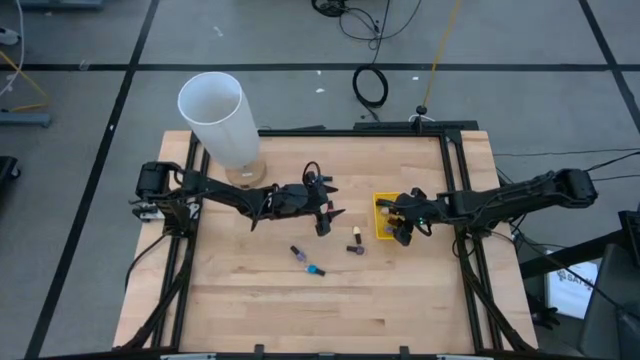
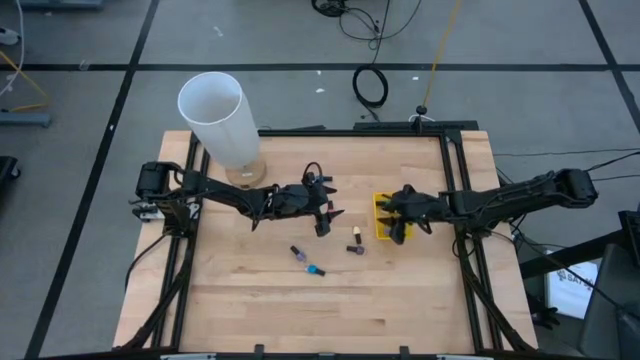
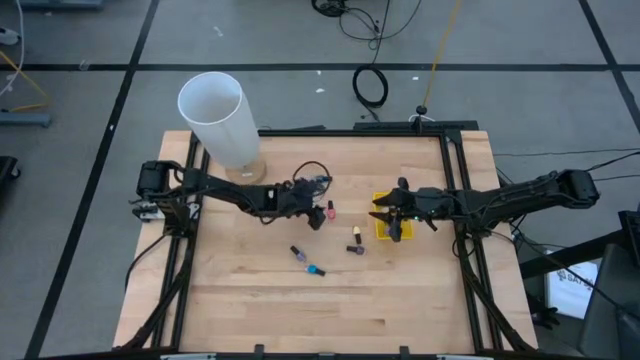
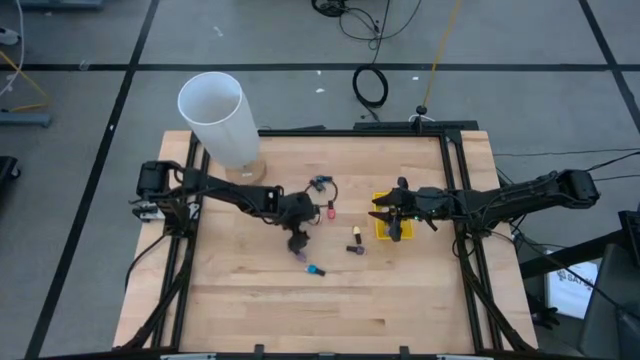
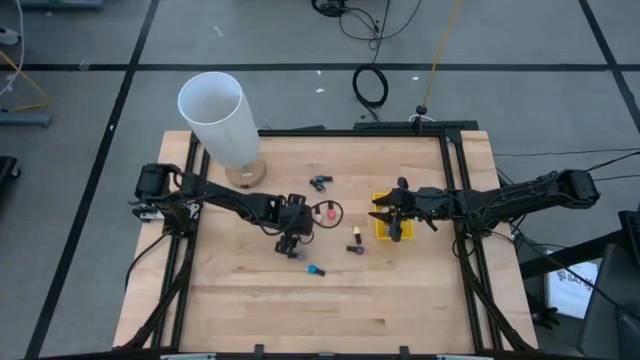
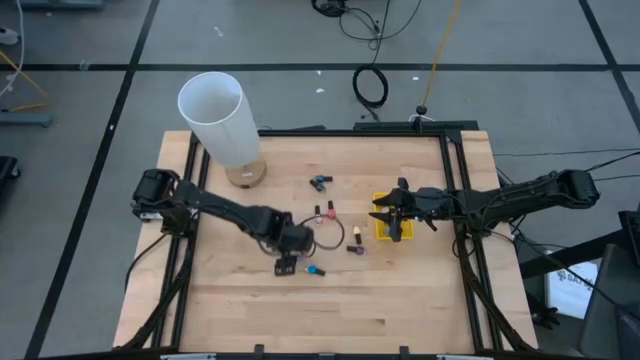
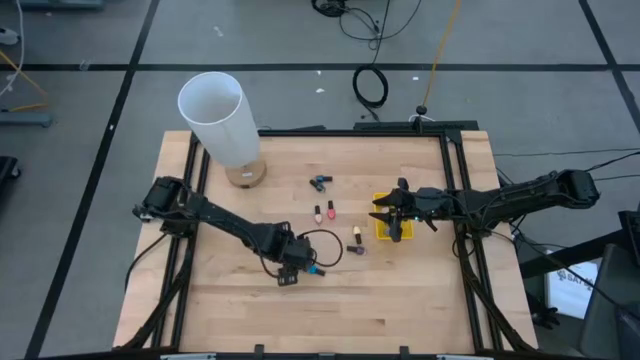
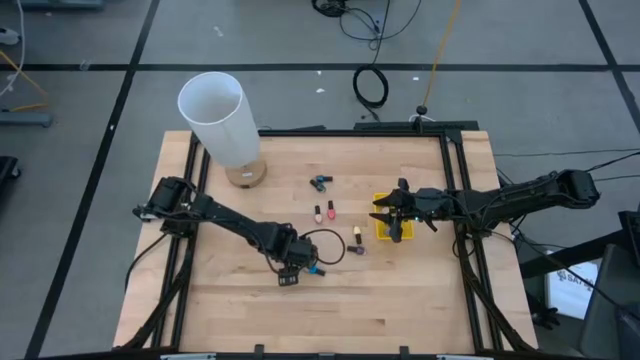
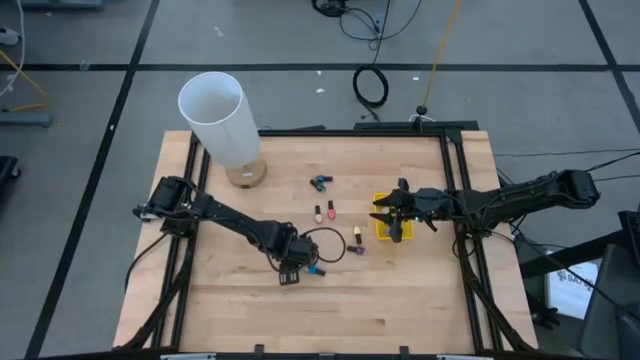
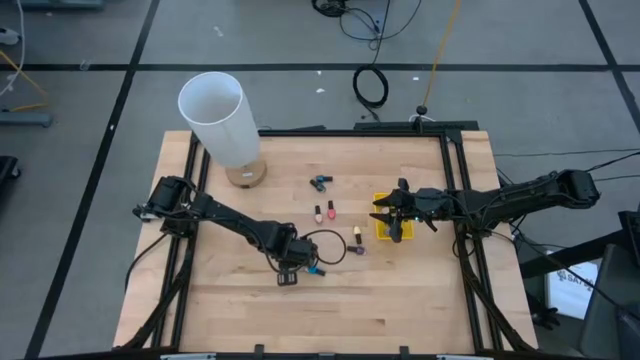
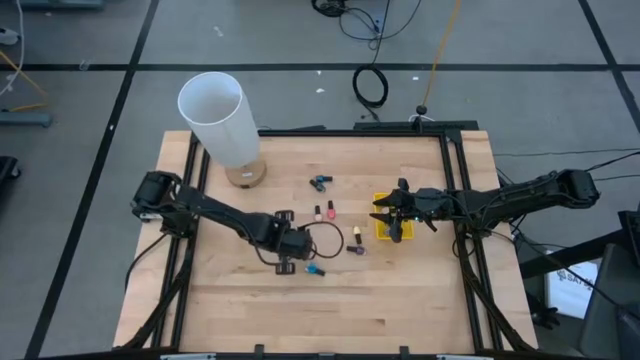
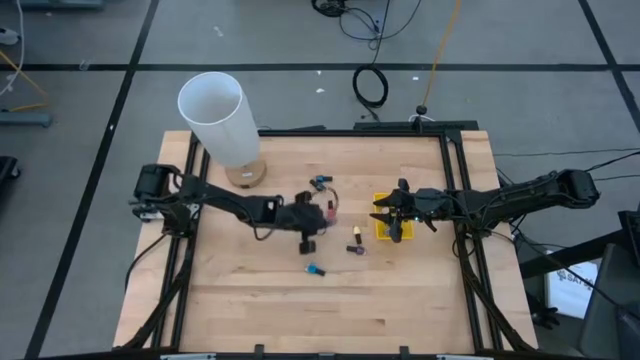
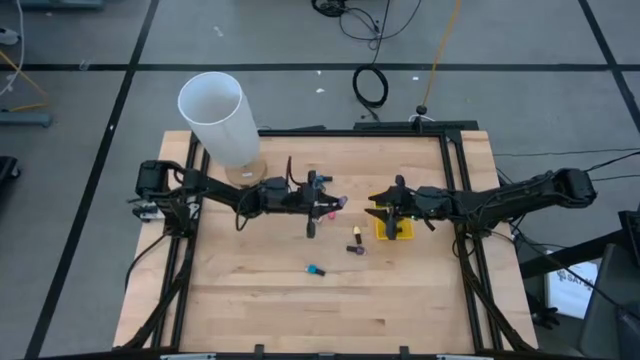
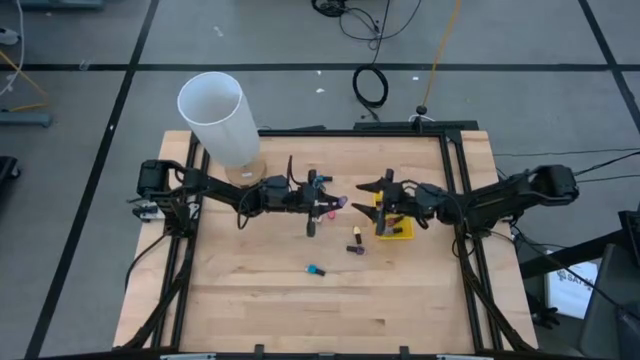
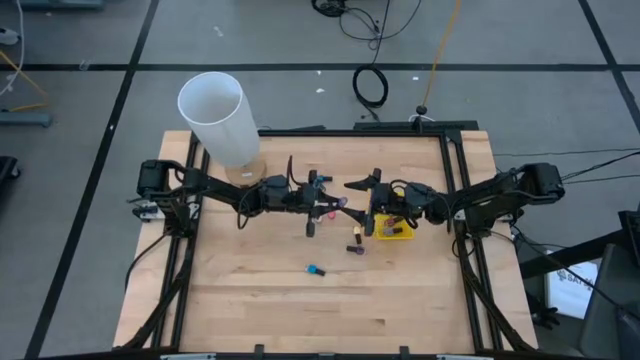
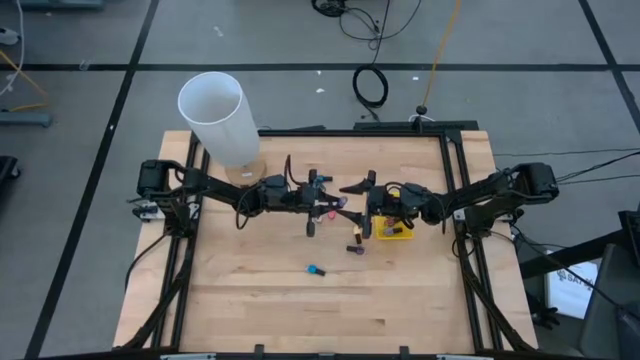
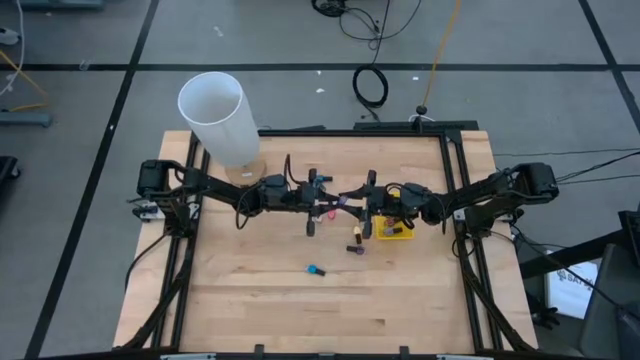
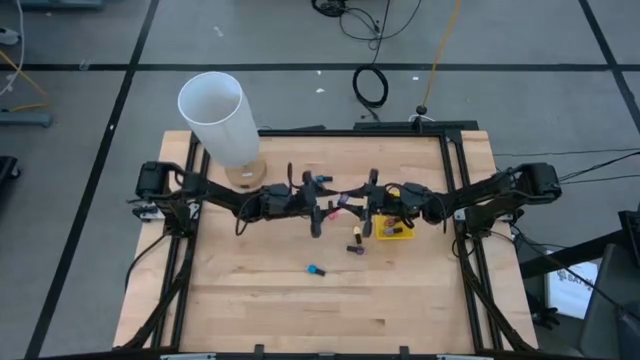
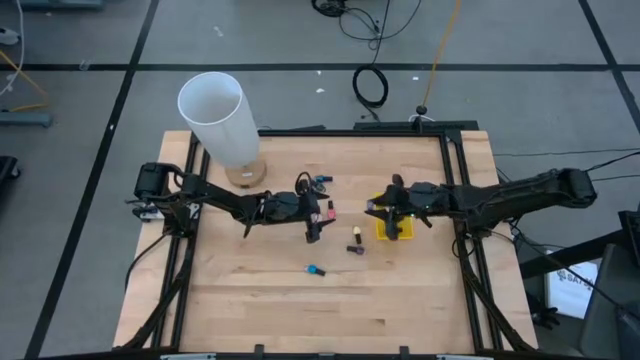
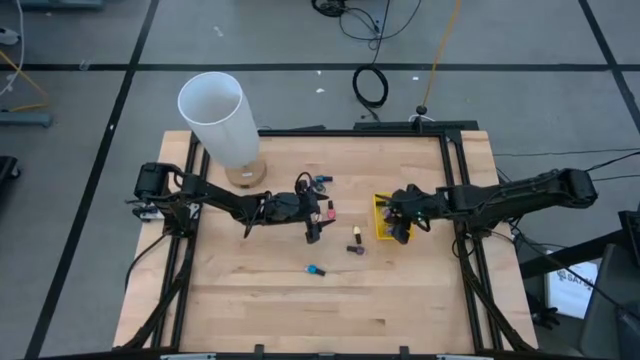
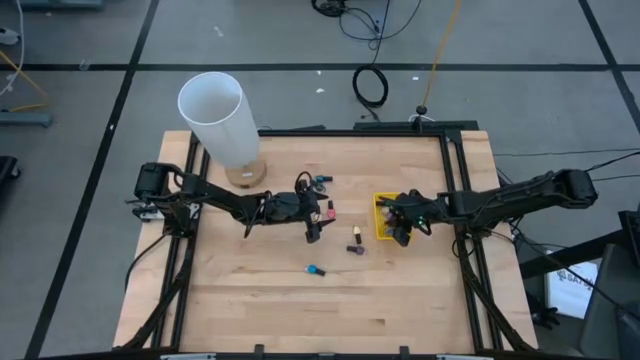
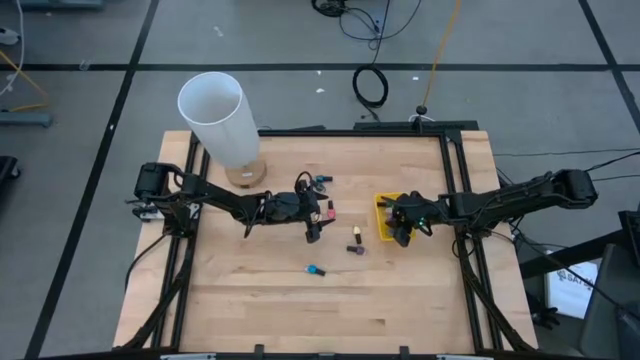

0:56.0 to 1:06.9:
Task: Pick & Place Nail Polish
Put the light violet nail polish into the yellow bin

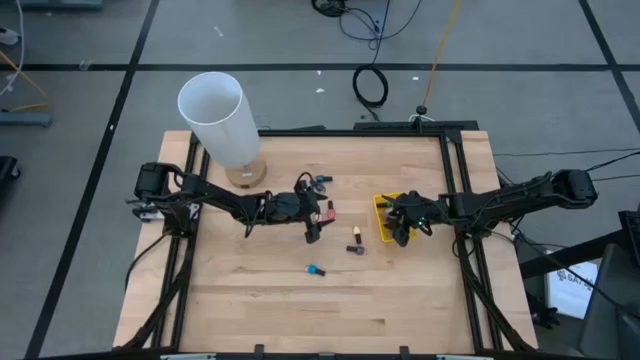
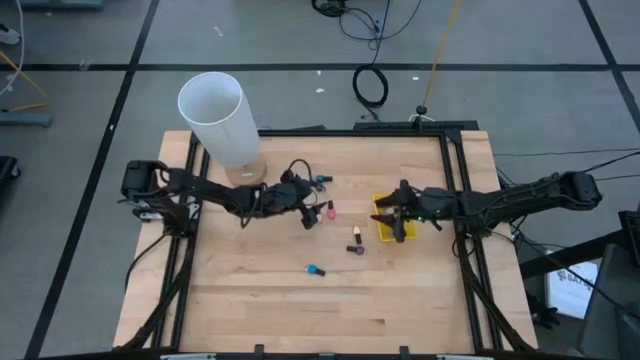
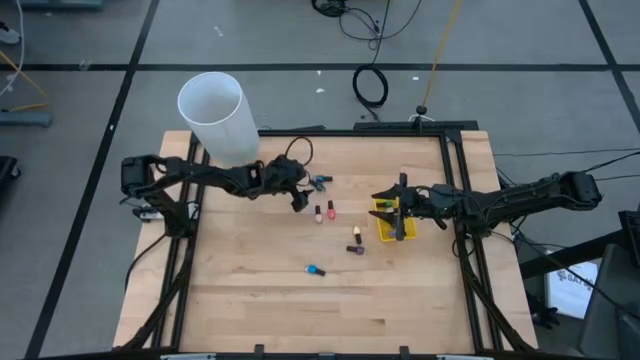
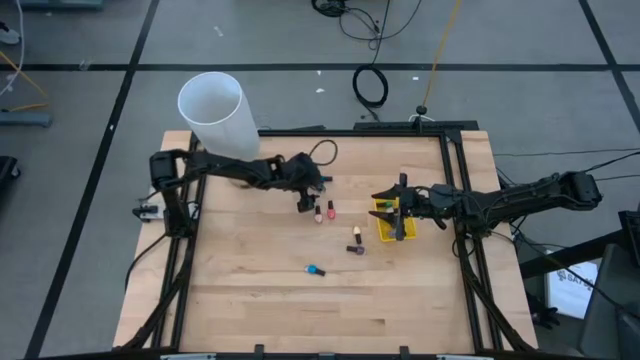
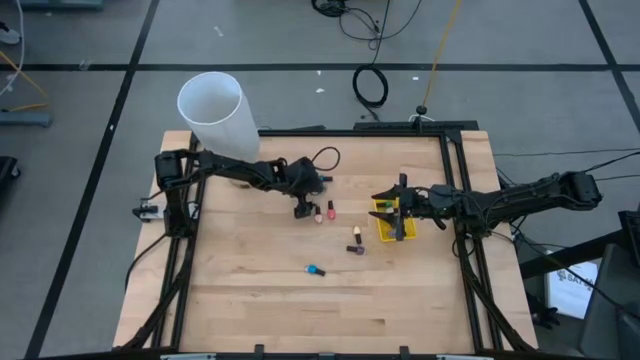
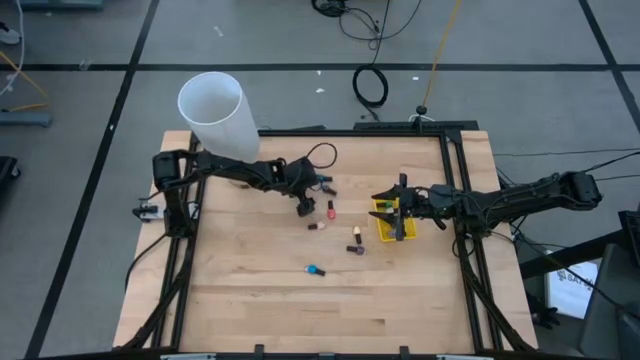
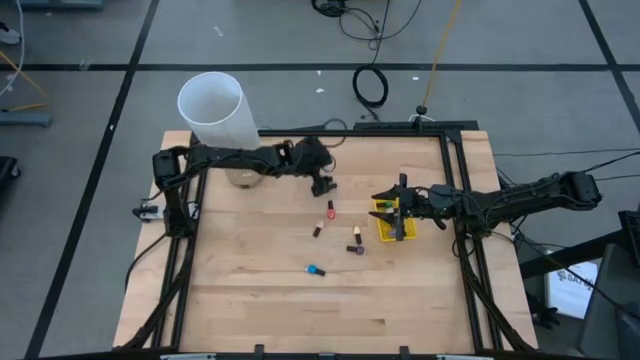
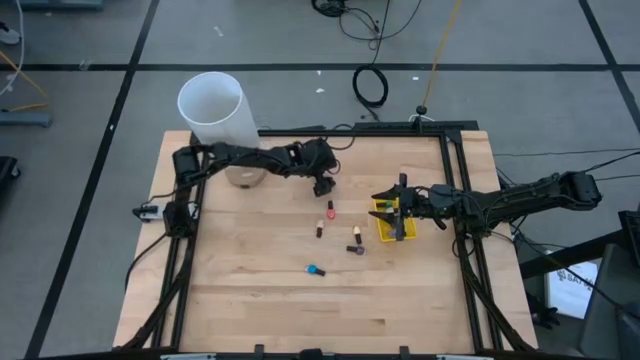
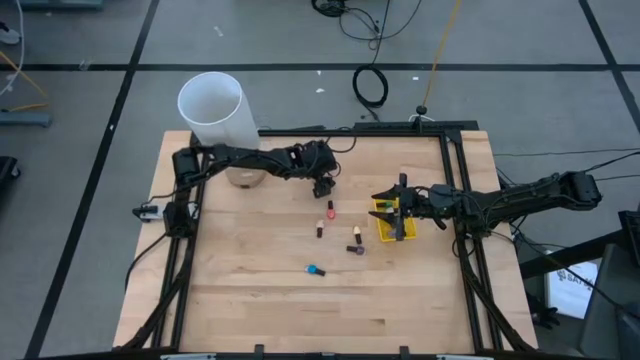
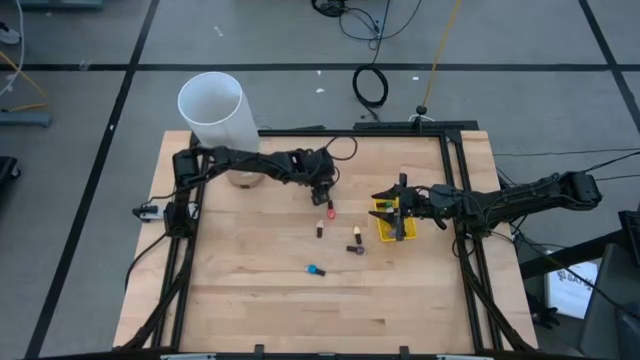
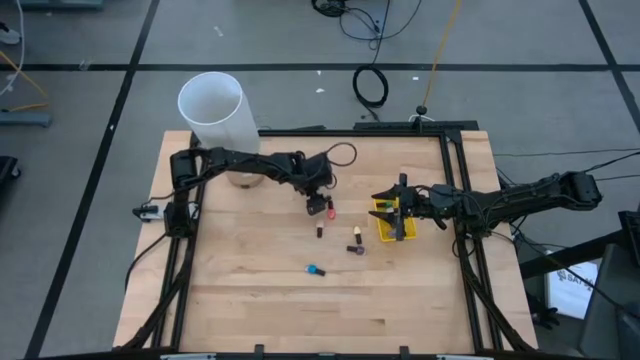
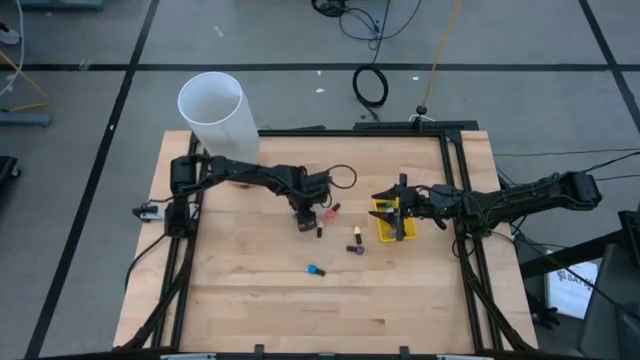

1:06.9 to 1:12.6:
Put the dark green nail polish into the yellow bin

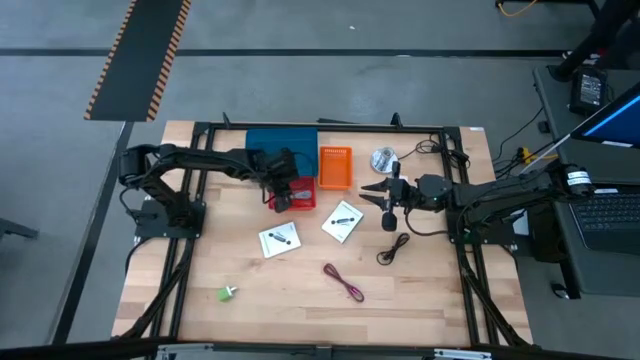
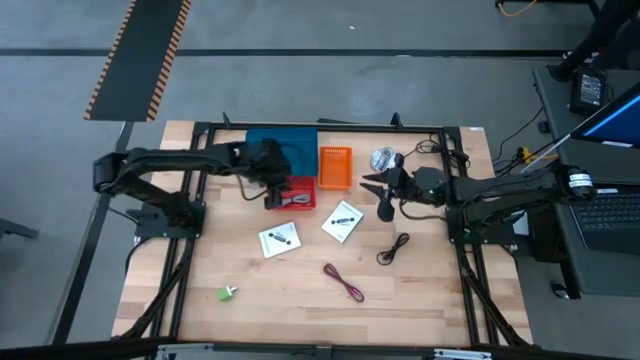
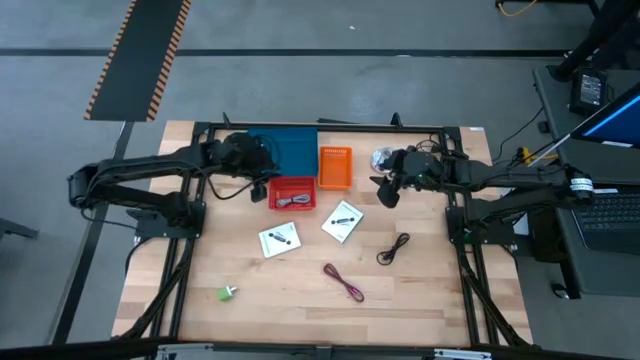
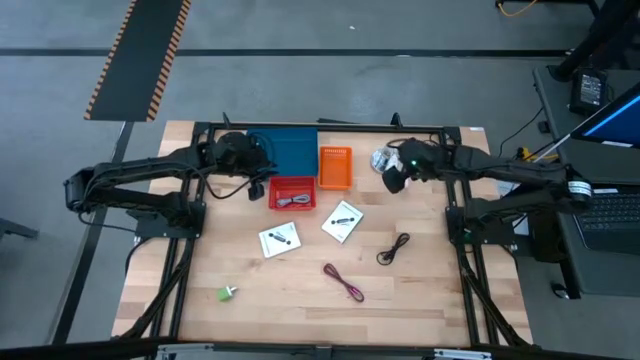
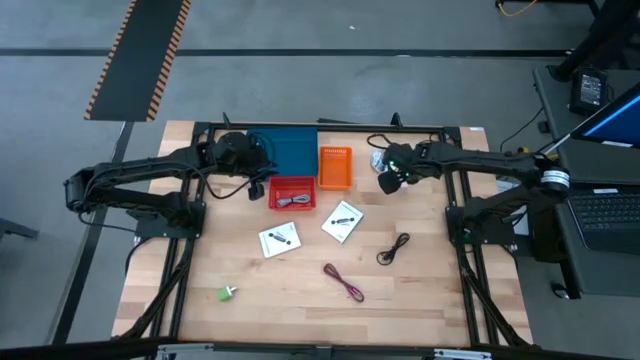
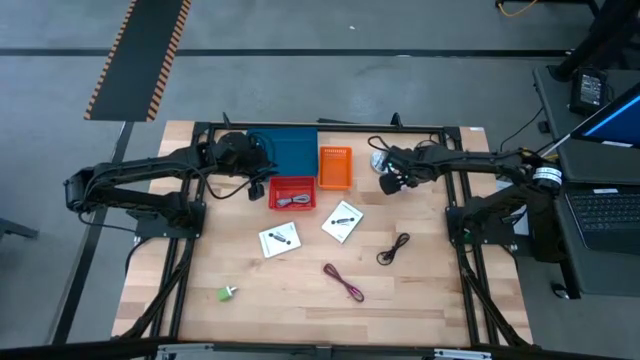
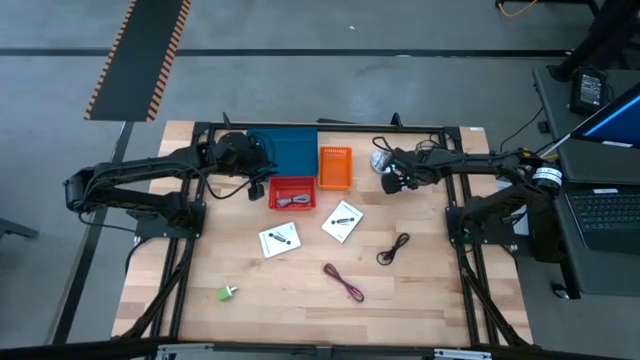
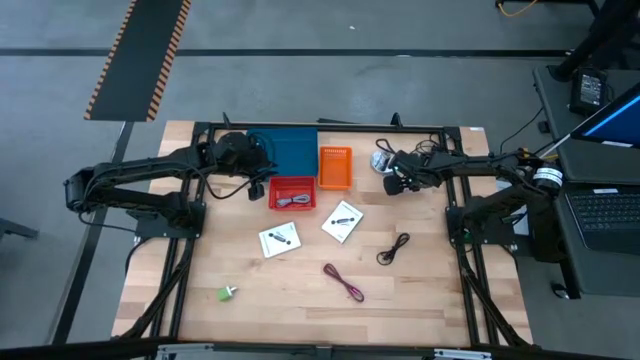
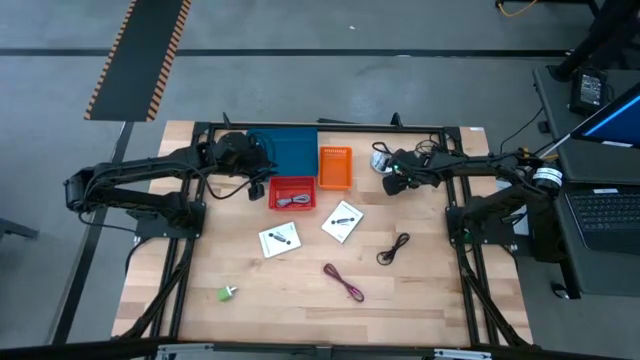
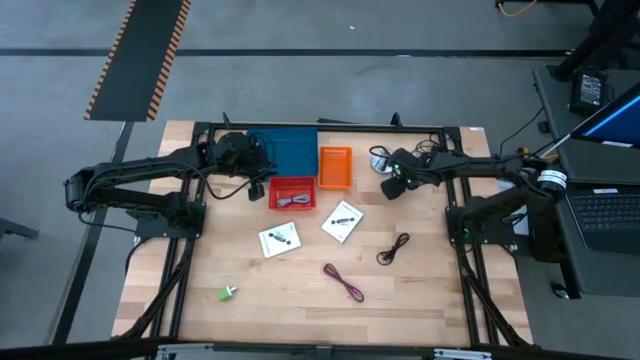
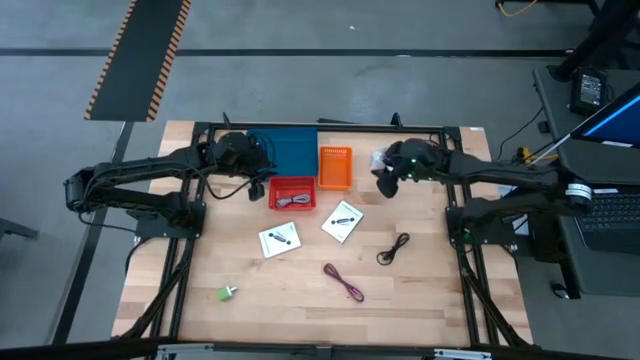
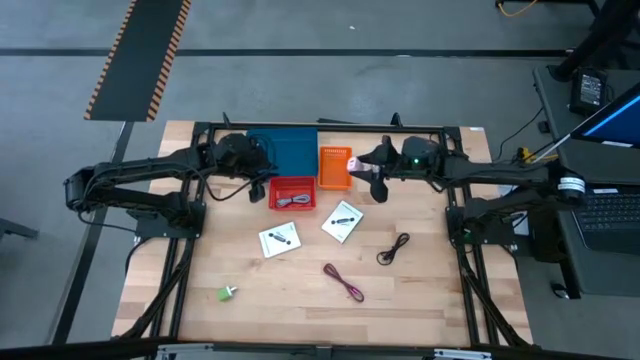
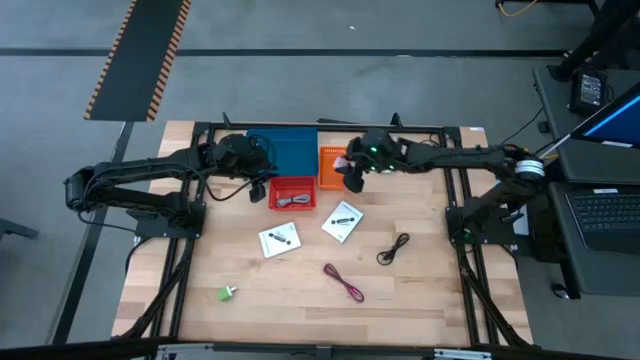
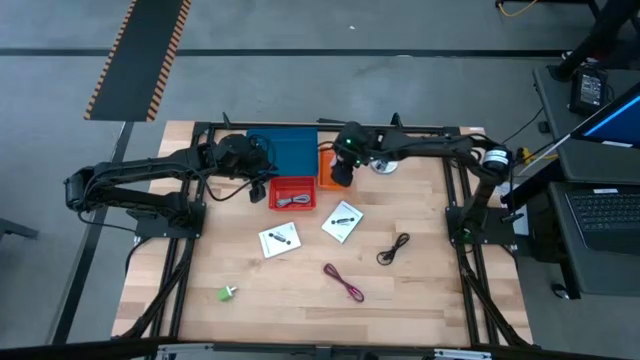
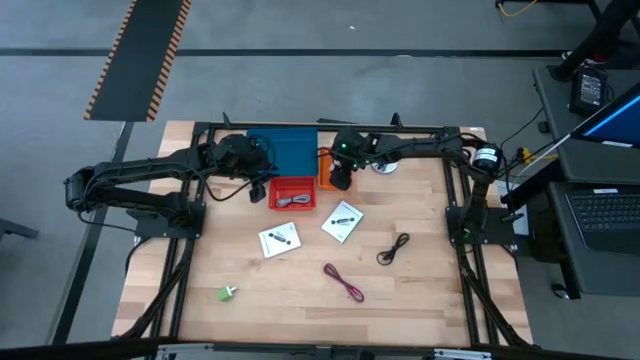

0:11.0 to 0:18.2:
Task: Pick and place items into bin
Put the white charger adapter into the orange bin
